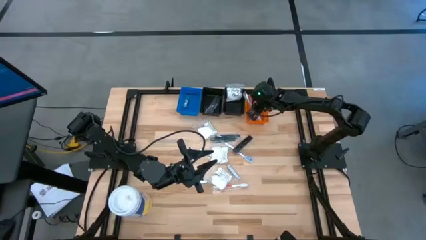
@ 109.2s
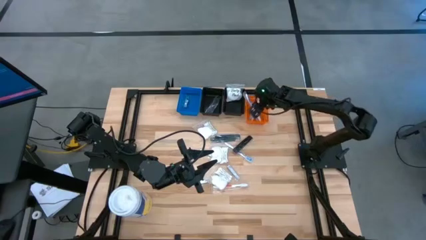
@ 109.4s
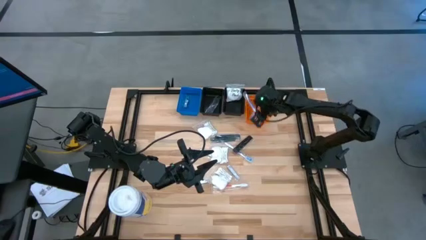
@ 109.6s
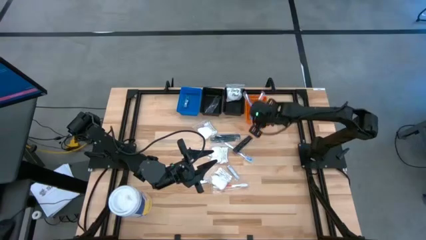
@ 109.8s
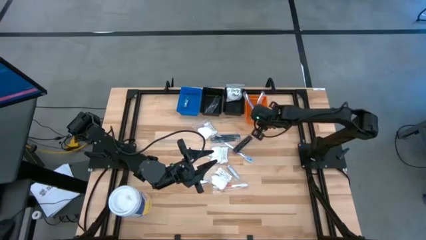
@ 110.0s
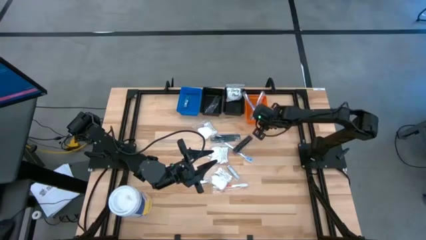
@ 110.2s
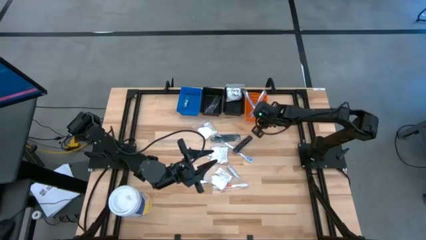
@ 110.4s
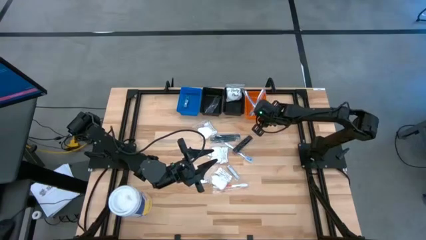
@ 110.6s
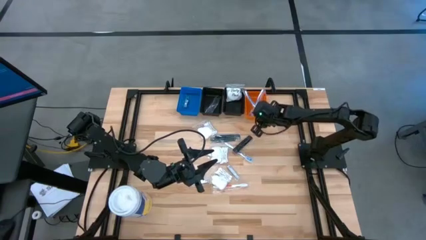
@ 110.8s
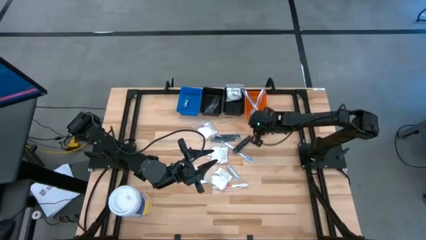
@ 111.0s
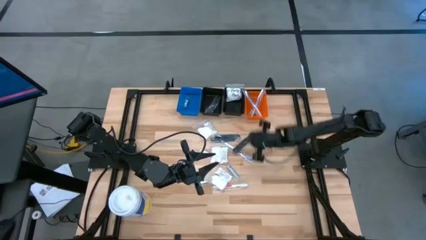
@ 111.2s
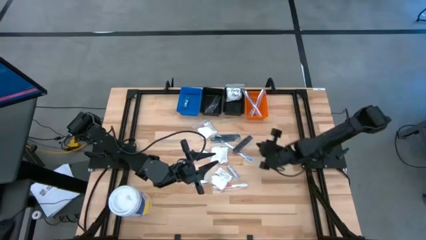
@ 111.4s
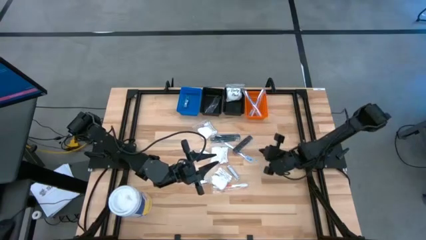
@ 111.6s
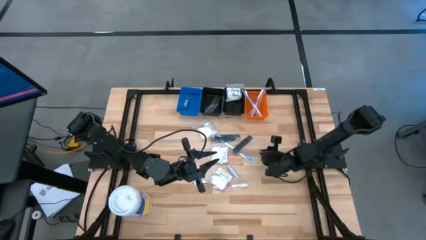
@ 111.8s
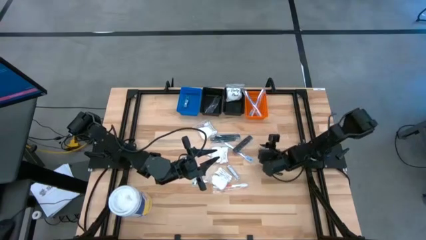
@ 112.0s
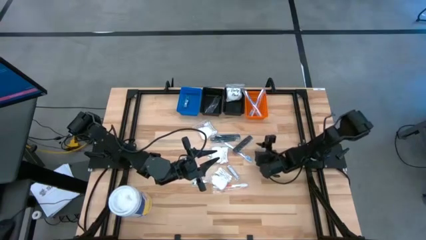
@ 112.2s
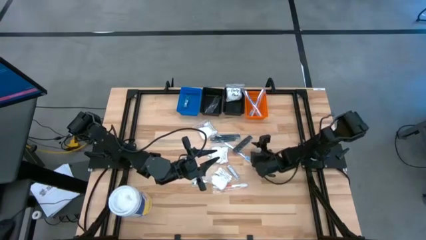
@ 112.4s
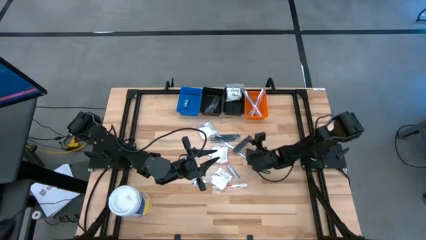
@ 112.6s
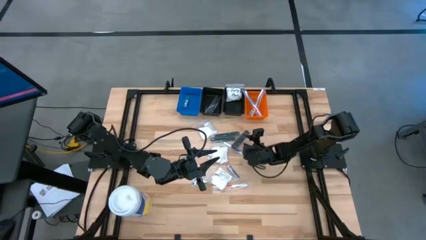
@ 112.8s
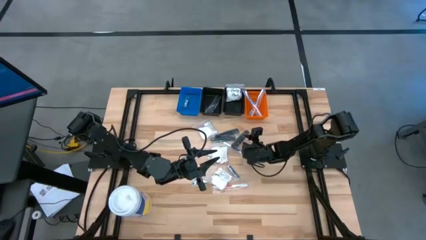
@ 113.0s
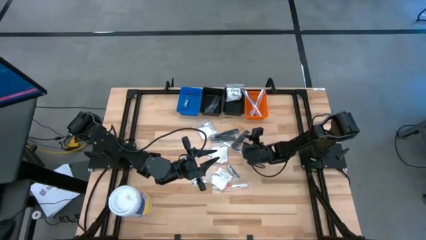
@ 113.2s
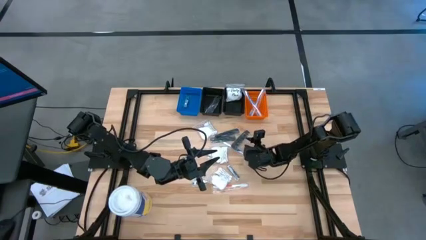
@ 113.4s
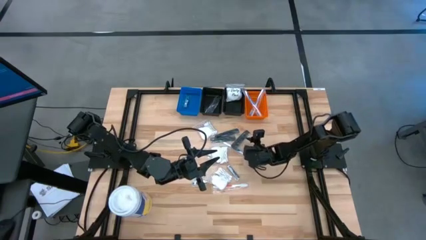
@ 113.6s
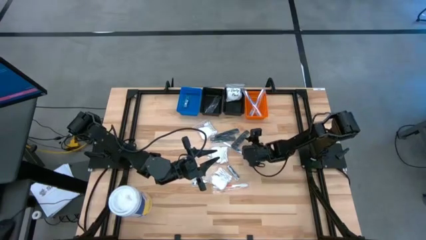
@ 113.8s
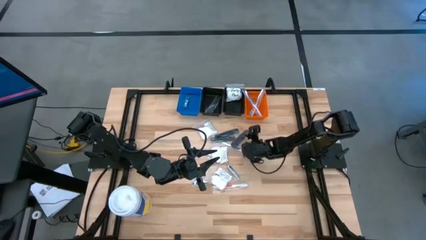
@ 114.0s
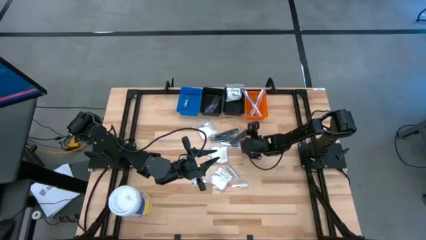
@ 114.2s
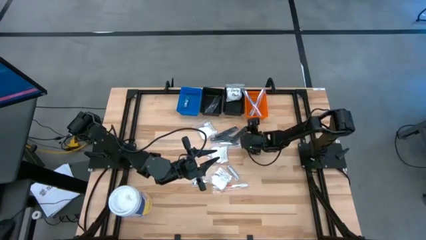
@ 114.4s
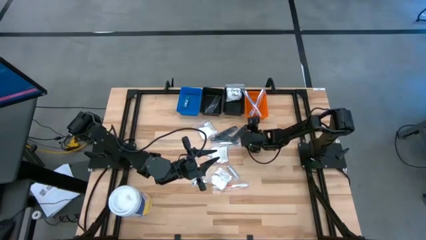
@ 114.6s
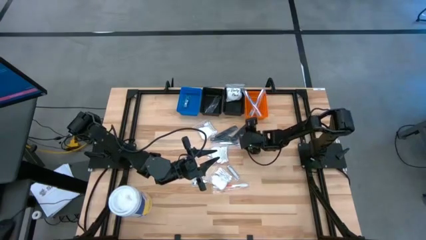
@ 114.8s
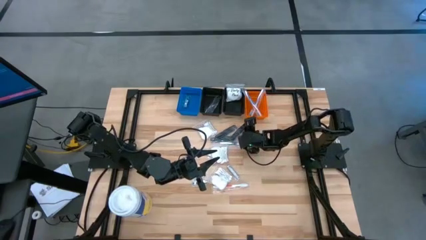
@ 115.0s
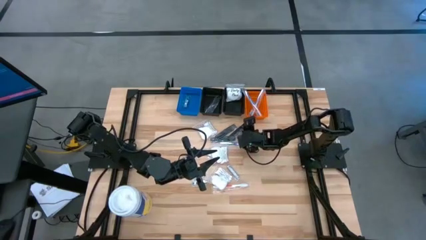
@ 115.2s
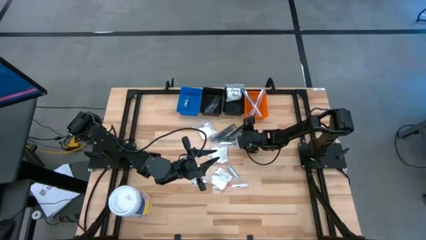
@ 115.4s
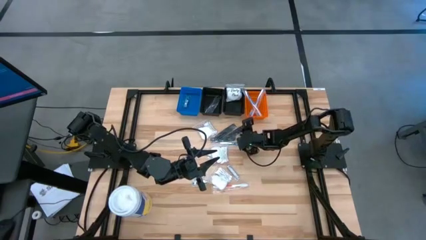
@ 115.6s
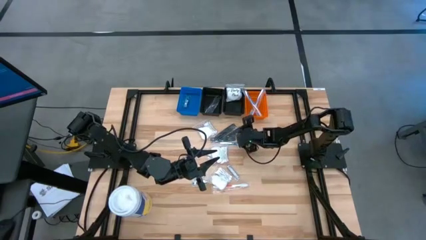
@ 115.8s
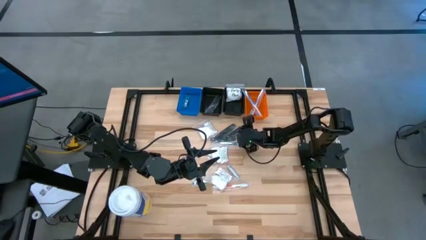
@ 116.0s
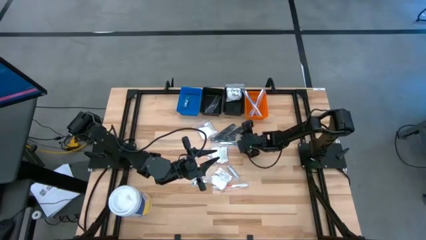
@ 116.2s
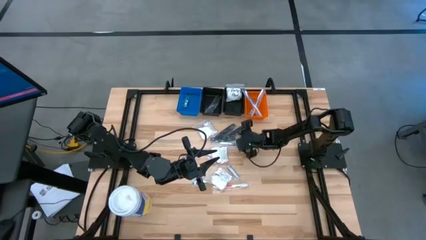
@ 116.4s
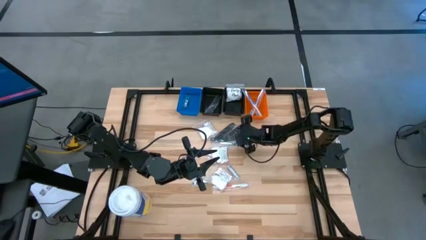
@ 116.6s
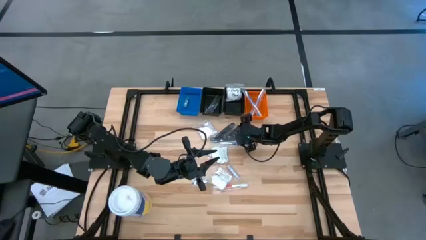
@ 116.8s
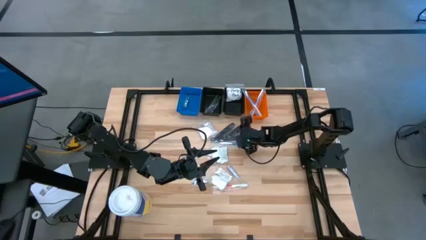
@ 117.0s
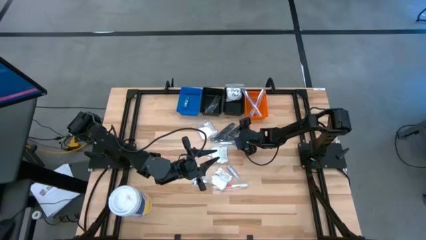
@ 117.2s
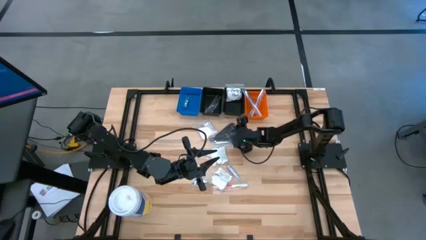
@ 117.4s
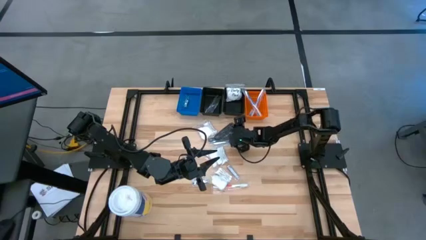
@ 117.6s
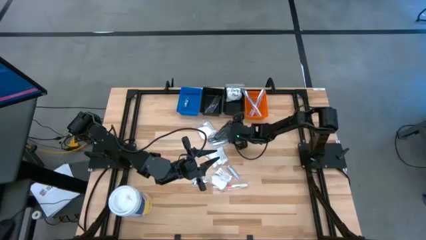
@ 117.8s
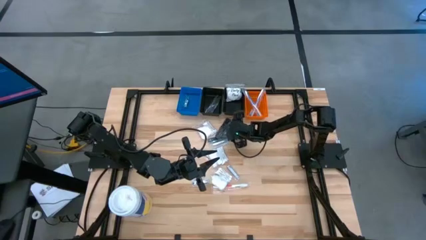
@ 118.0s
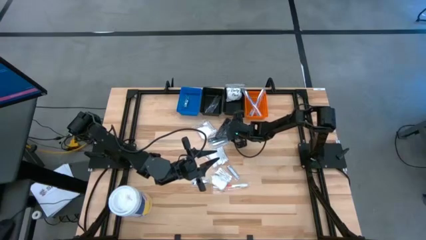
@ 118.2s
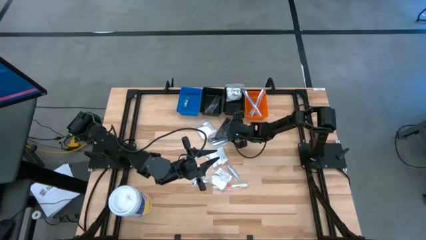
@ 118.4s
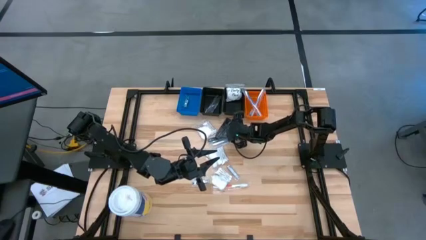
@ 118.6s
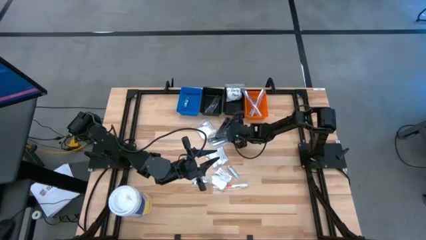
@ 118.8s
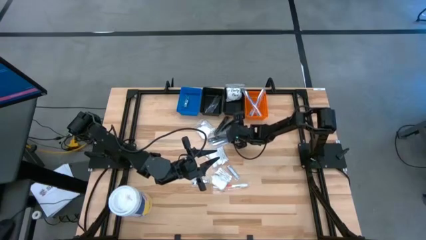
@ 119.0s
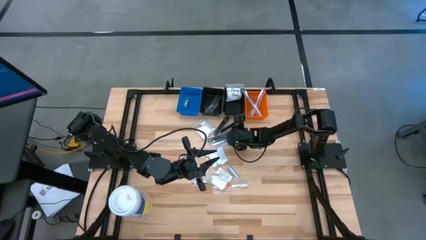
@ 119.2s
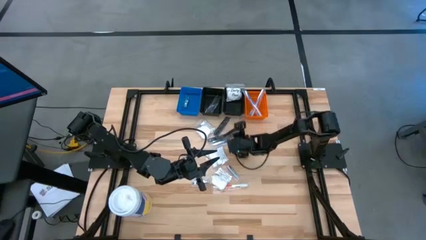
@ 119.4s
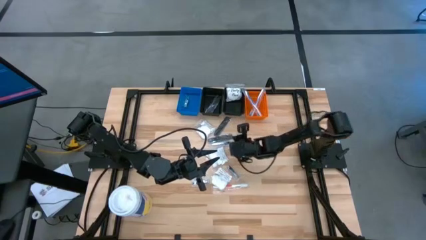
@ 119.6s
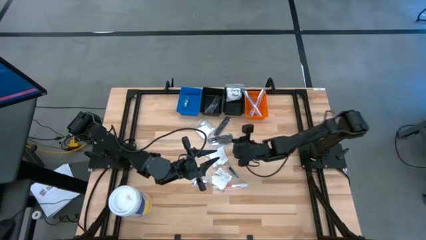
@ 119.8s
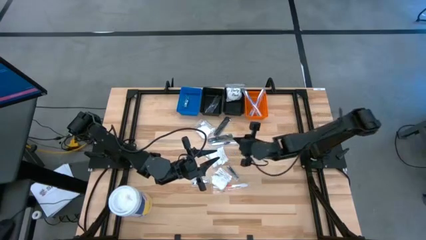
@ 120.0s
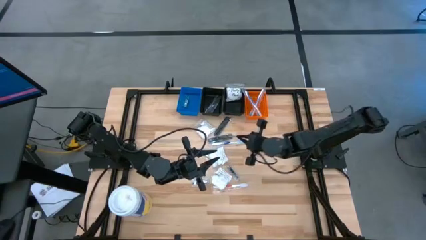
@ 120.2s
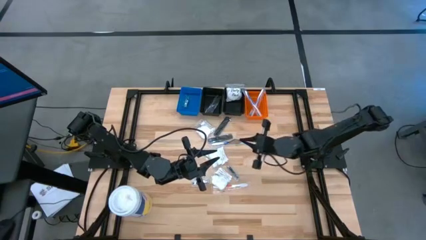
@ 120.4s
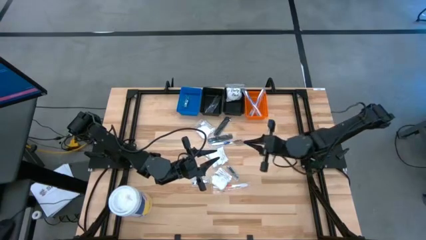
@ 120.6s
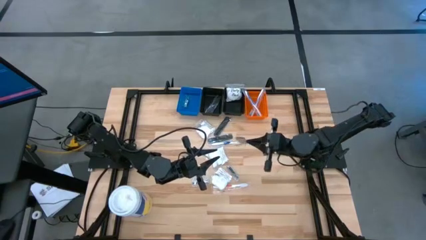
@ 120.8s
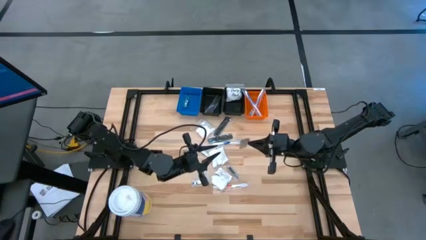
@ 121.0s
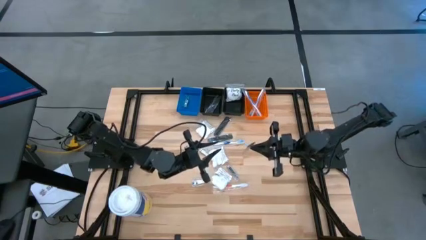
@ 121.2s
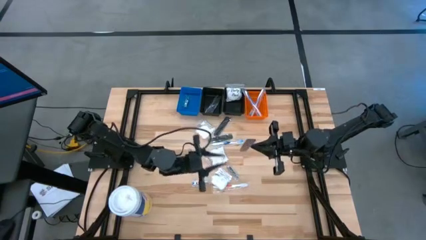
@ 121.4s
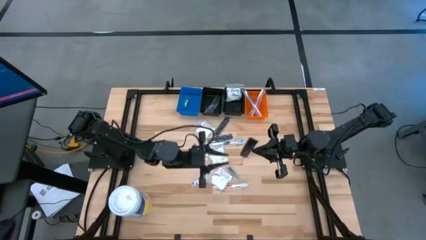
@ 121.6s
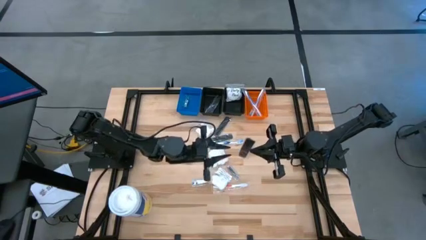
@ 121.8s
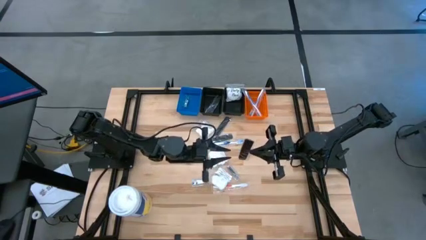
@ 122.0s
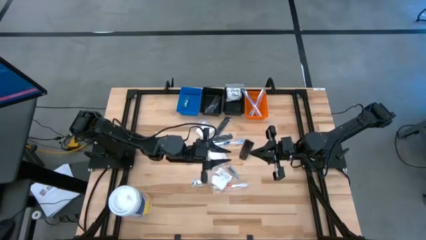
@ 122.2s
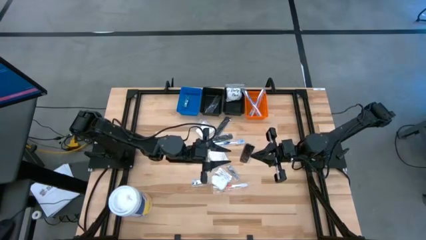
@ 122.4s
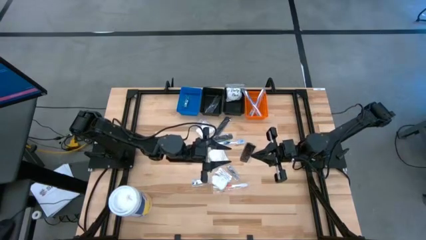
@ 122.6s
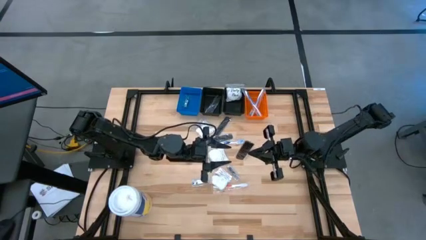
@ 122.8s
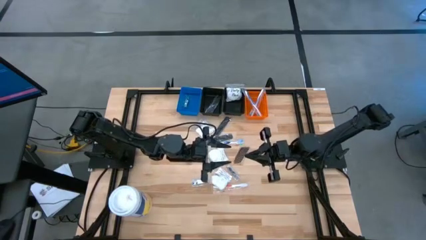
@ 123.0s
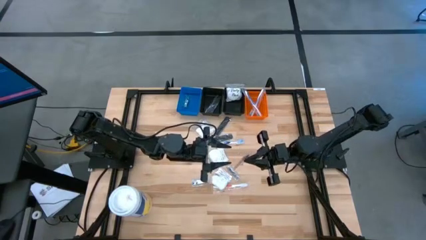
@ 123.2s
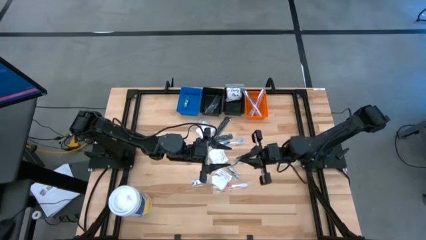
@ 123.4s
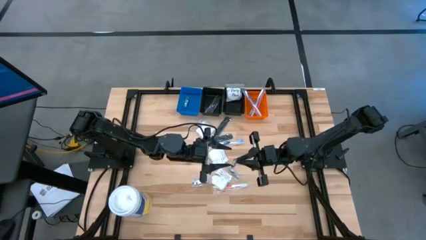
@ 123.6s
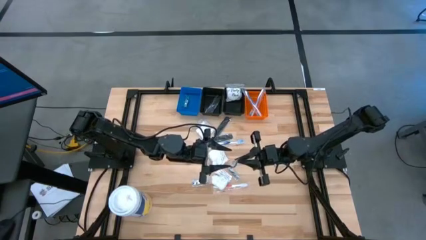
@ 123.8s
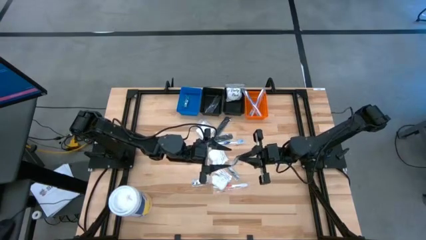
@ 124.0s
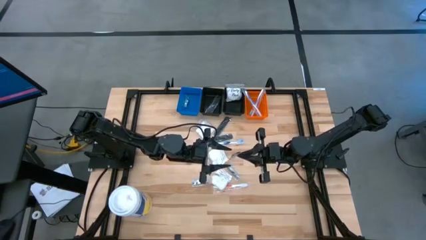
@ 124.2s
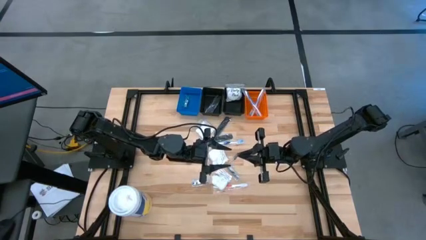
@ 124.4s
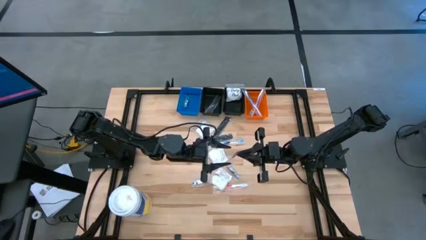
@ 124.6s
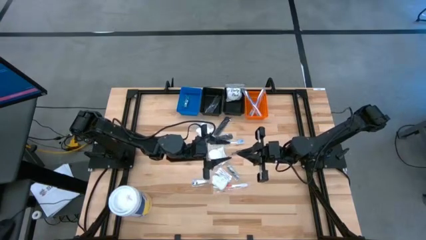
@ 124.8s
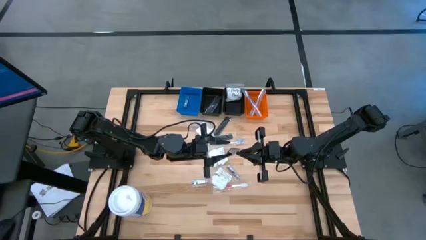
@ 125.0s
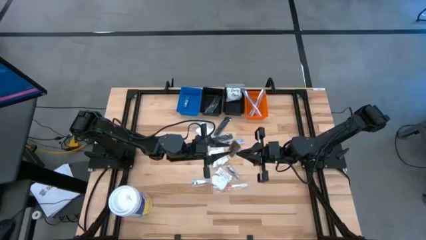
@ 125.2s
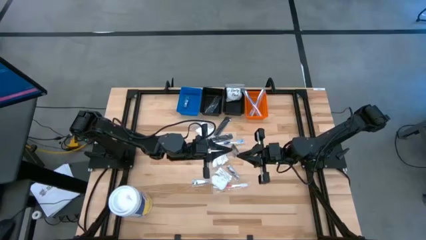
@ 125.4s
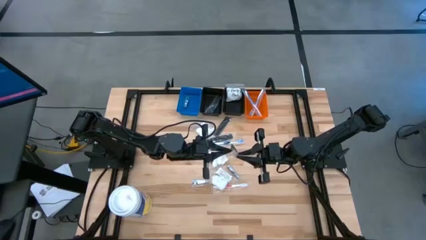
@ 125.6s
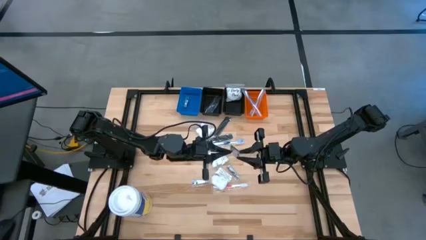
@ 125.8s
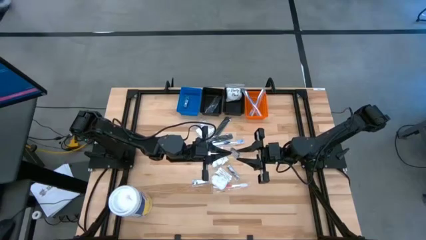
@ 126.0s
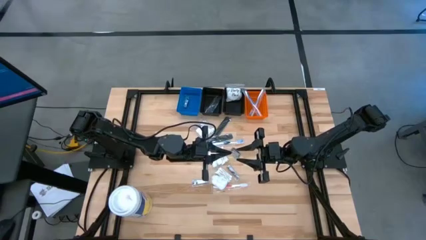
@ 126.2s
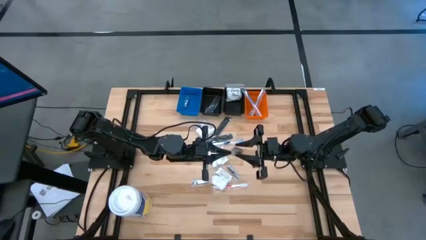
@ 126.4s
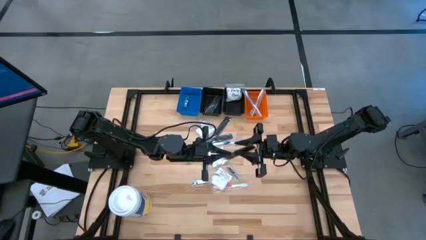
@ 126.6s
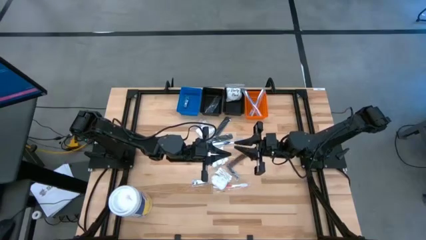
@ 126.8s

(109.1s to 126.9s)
Task: Pick & Place Travel size toiletries
Put the black comb into the left black bin
